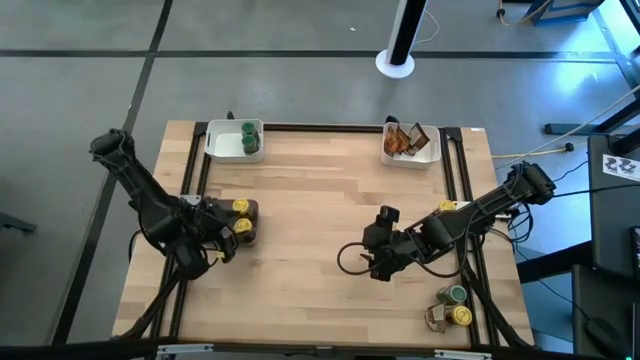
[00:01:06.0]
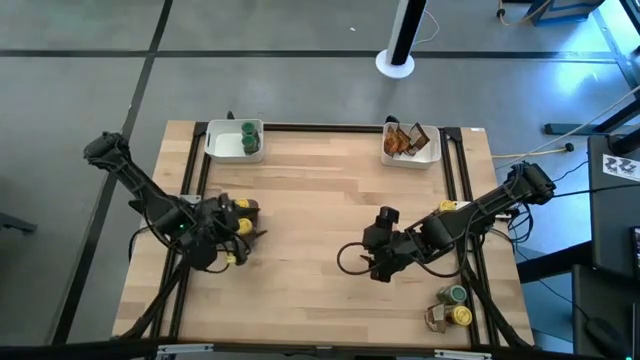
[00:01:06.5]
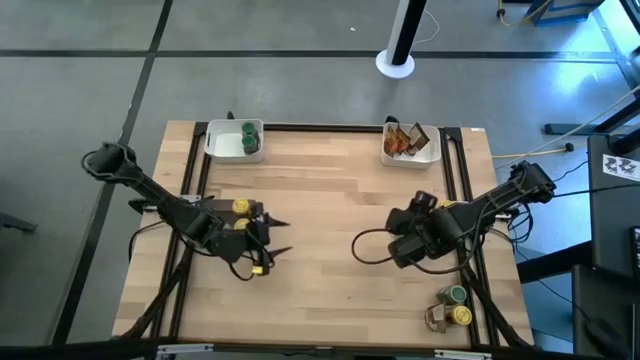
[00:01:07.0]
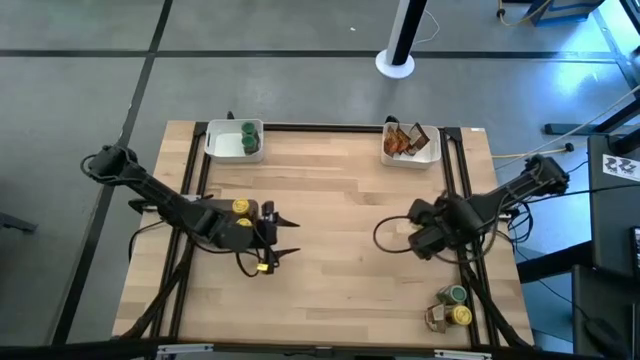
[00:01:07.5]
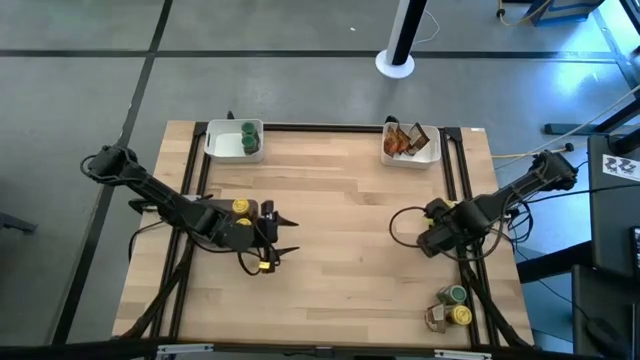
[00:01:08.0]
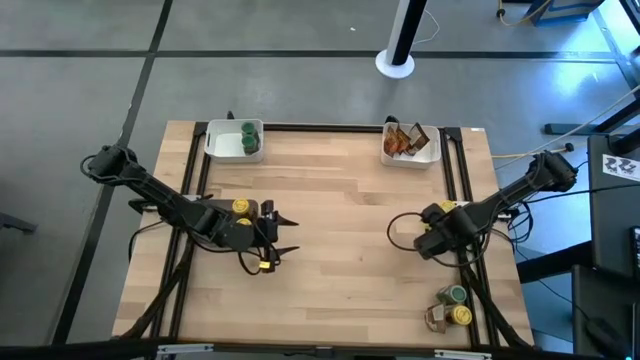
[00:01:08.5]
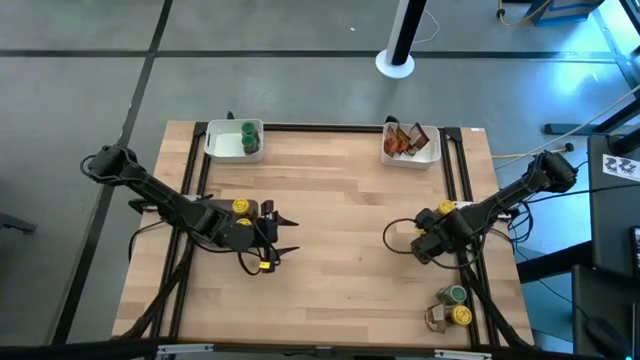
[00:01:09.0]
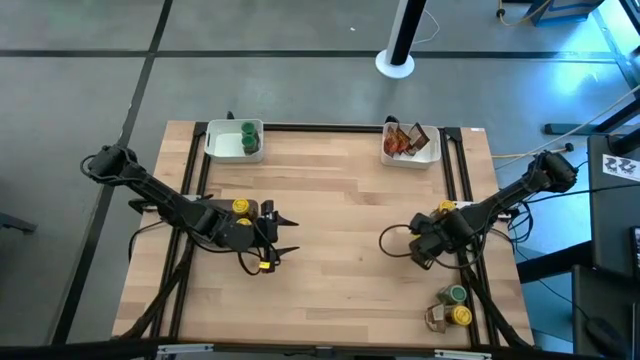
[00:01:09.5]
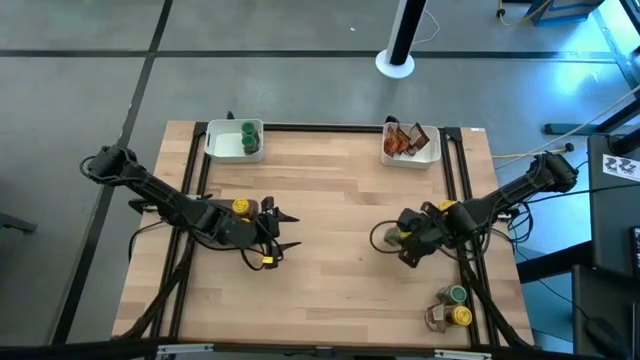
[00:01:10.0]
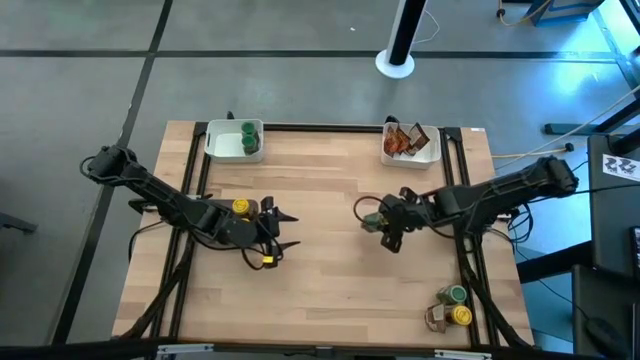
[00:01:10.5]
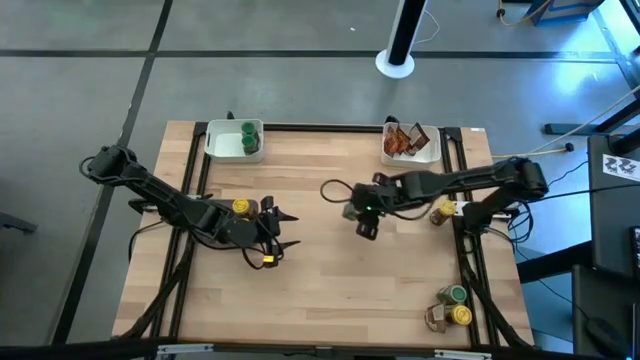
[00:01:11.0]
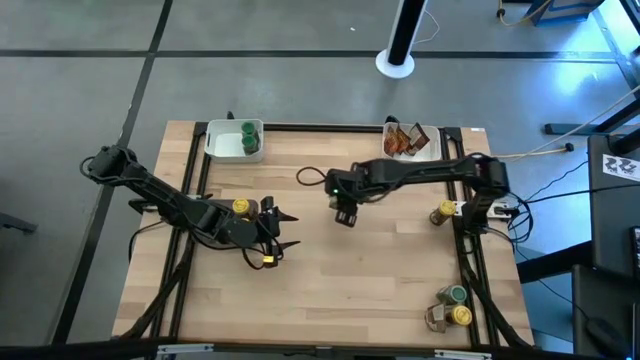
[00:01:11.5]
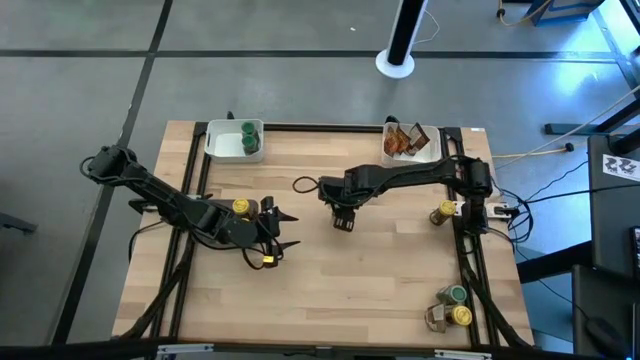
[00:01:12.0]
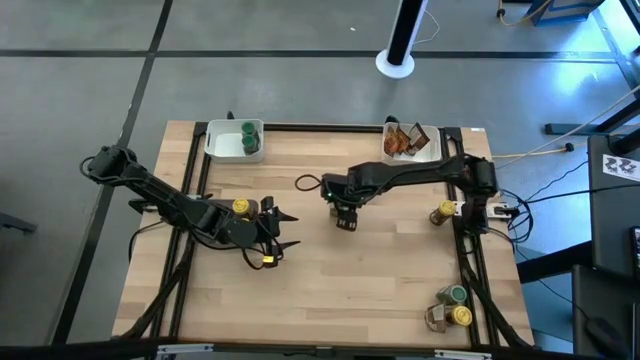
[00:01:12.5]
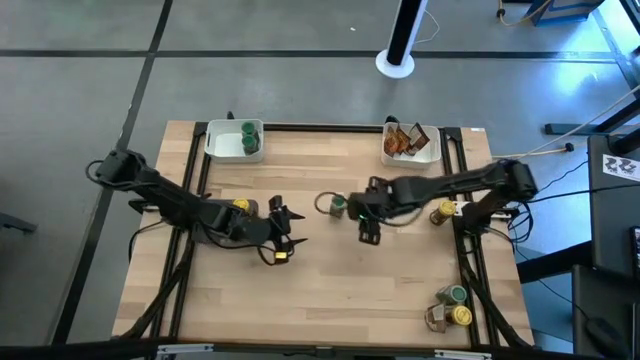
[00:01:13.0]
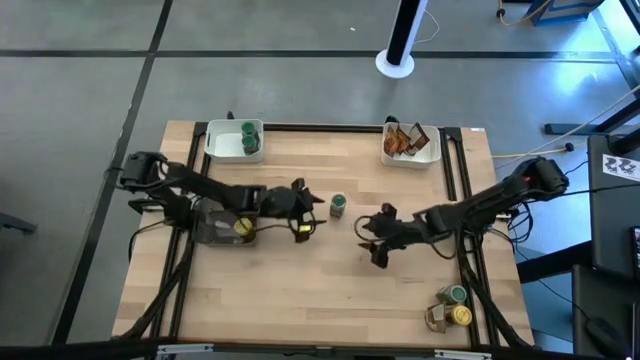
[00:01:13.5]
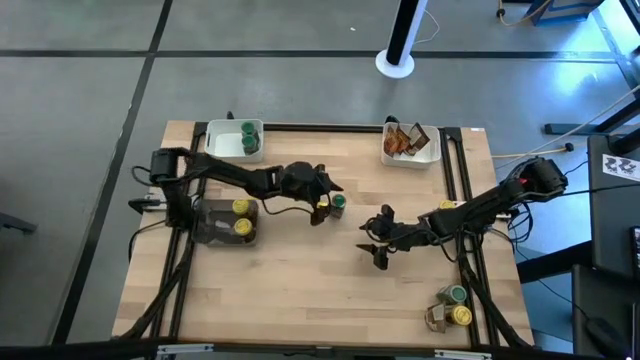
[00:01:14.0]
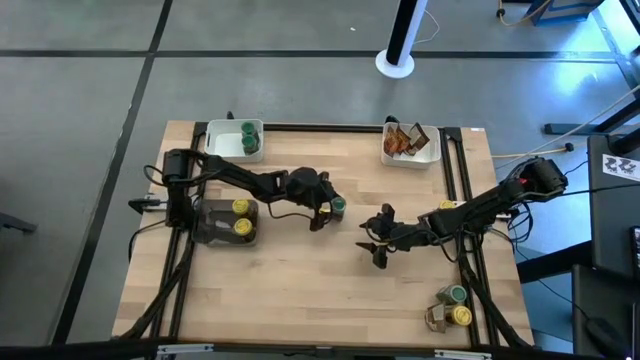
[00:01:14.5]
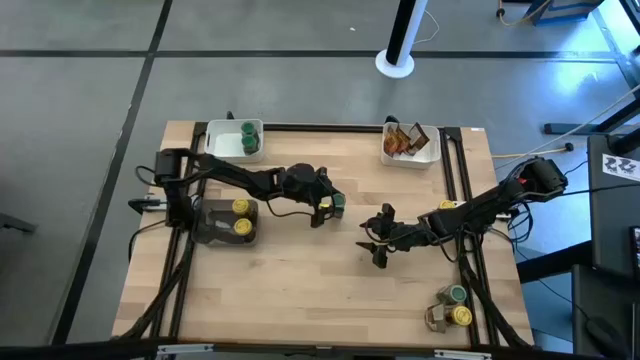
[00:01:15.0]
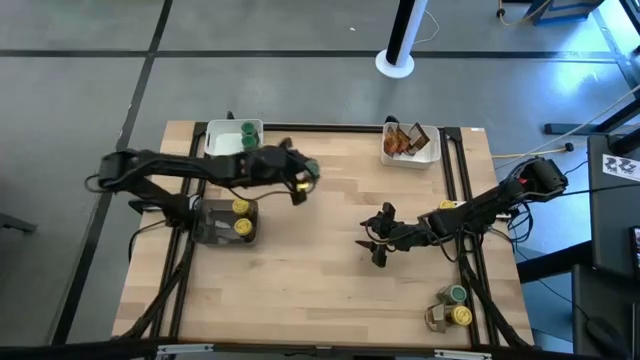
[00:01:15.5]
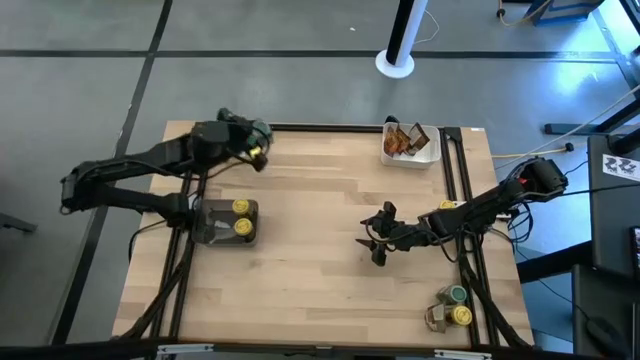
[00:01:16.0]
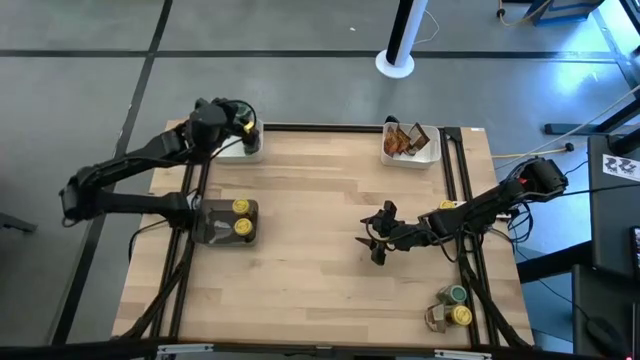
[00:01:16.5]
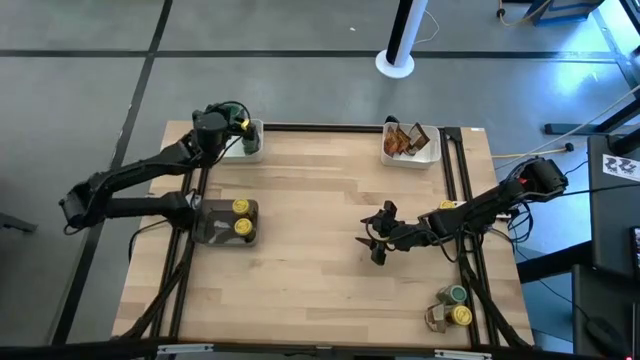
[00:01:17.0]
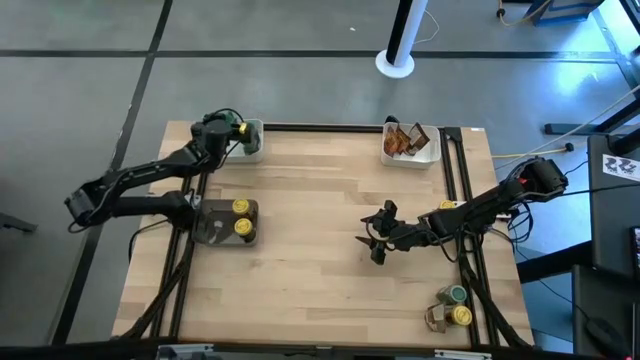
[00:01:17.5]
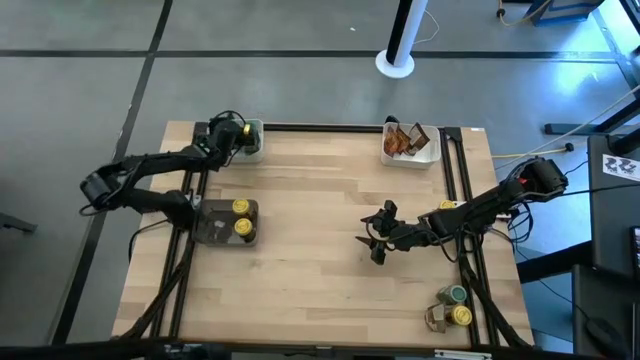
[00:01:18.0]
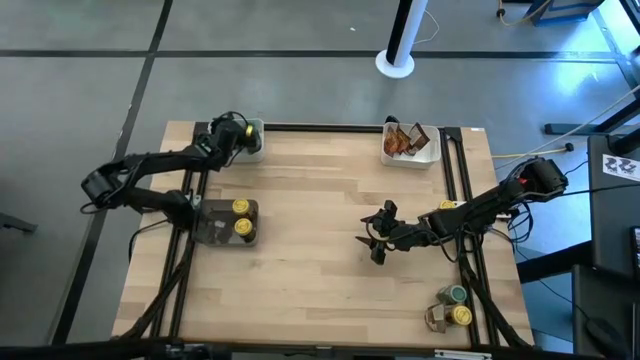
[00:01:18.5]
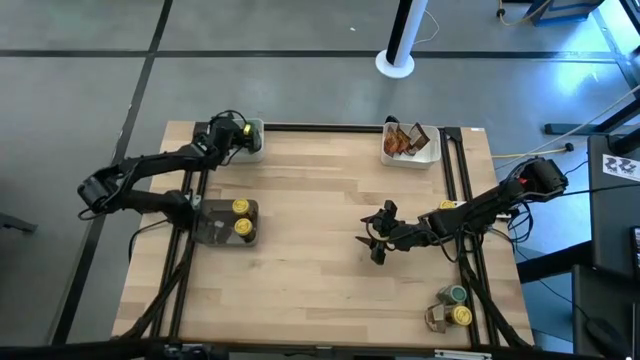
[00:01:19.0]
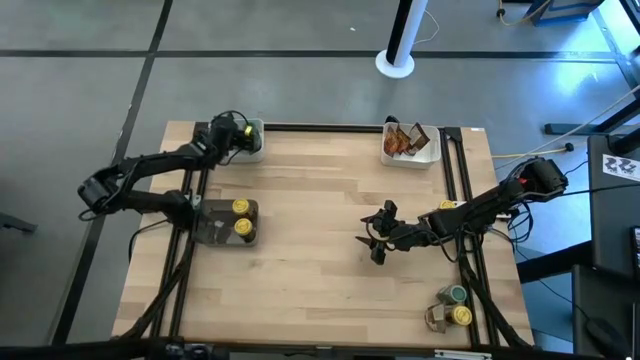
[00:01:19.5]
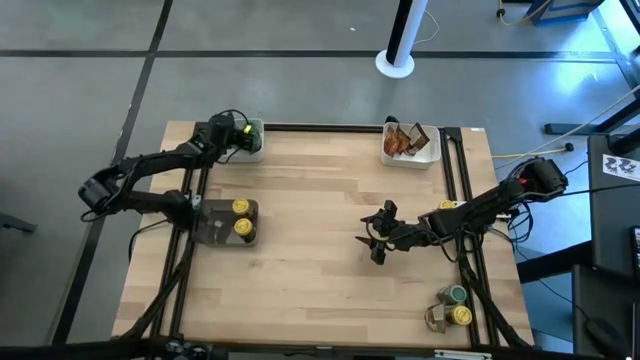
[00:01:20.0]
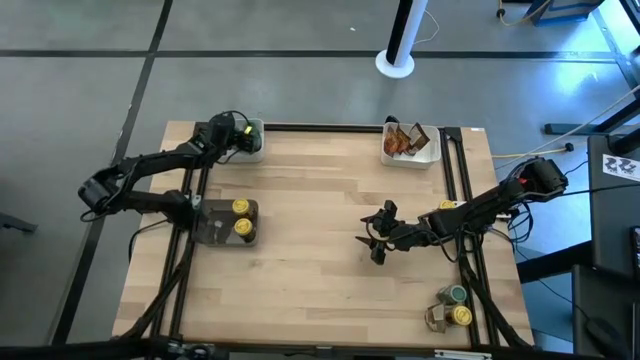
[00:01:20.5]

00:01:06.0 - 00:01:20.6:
Task: Sort spices by type
Put the green seasoning bottle into the top left white bin

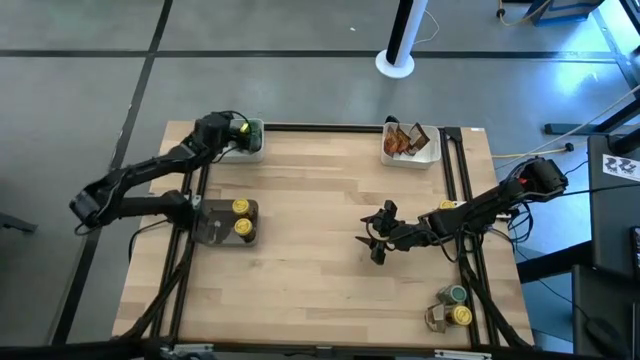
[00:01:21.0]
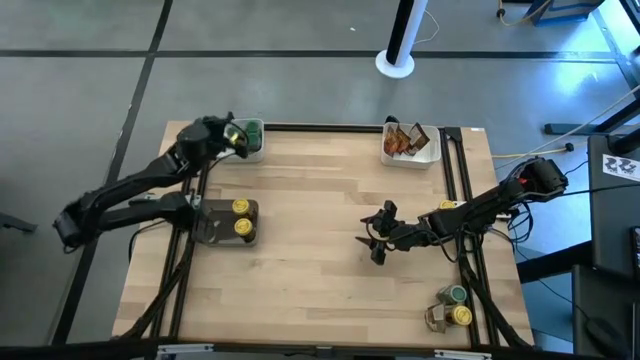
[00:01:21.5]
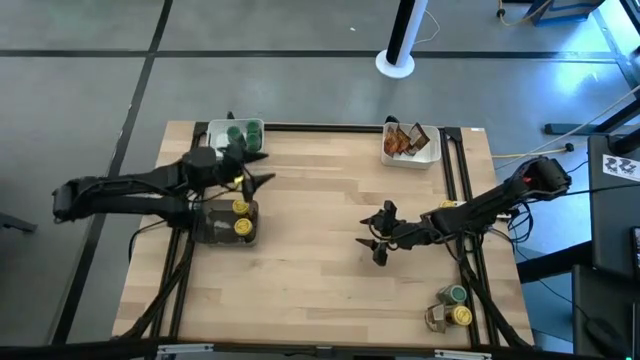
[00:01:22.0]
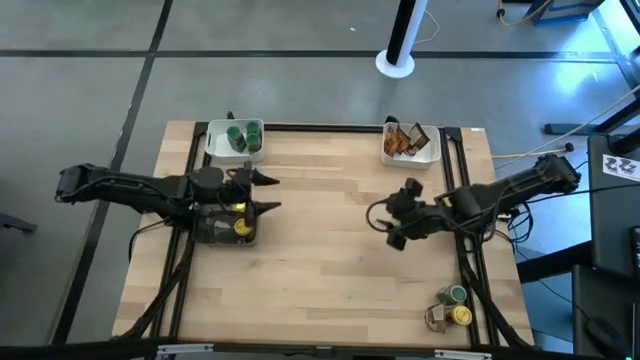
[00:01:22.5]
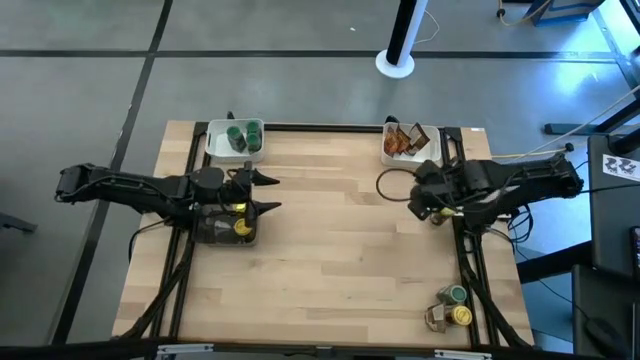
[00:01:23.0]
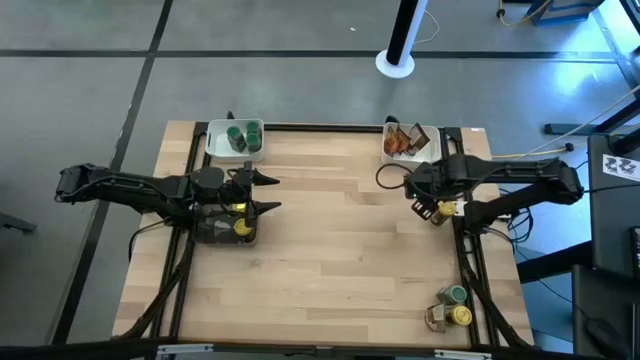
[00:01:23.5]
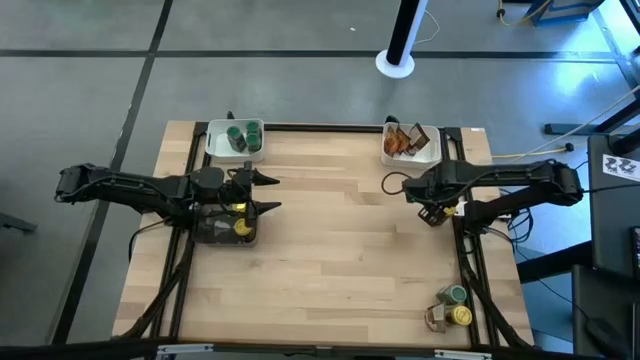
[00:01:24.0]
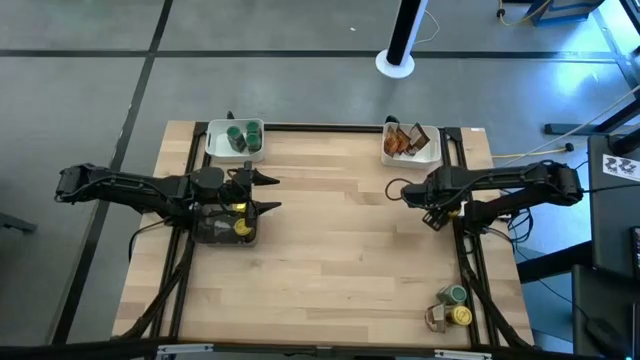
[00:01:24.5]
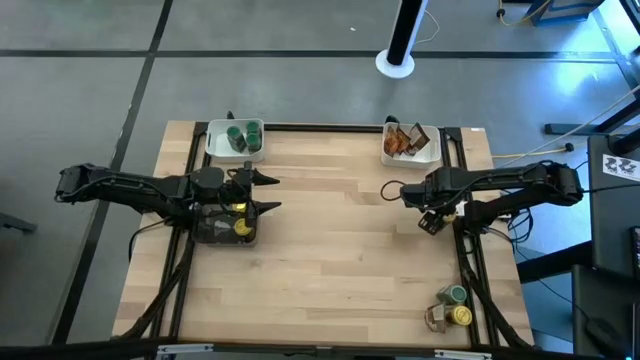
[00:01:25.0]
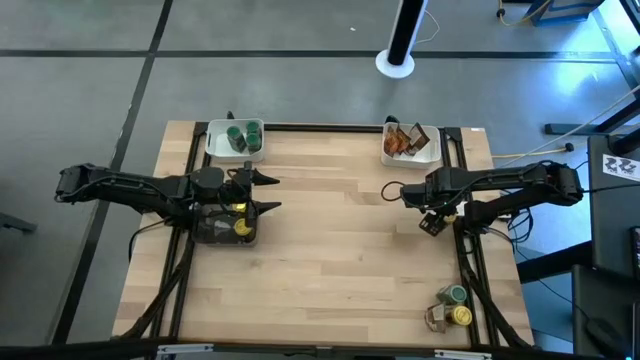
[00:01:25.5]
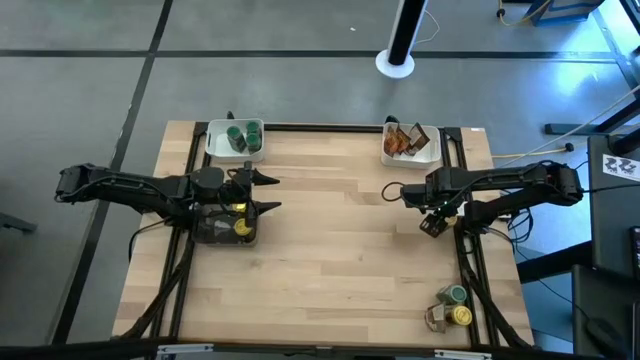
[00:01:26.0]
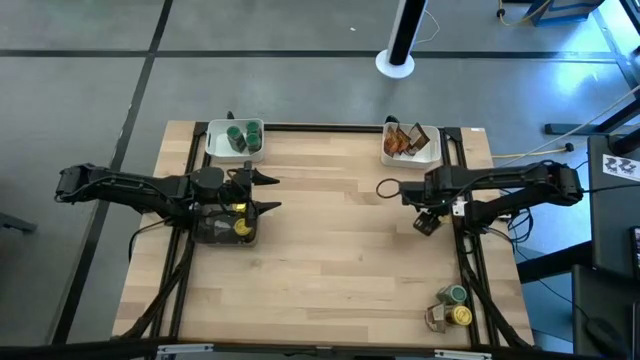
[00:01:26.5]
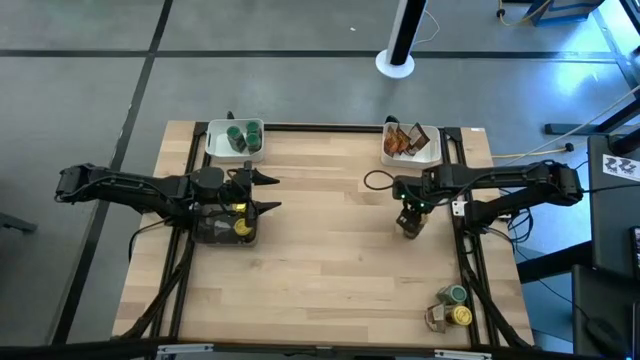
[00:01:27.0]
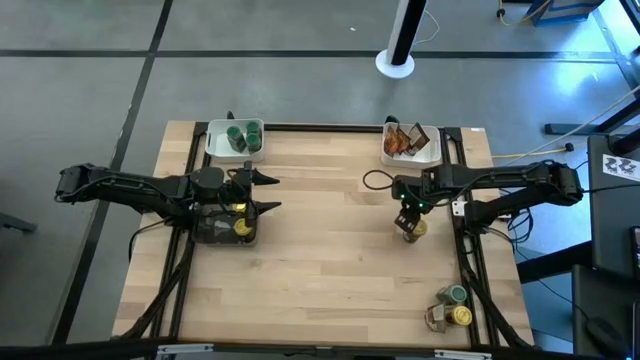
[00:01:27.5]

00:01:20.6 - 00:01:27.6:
Put the yellow seasoning bottle into the black bin
